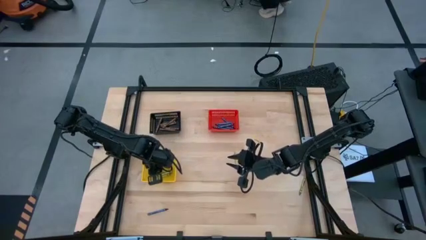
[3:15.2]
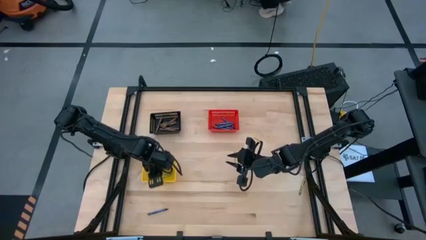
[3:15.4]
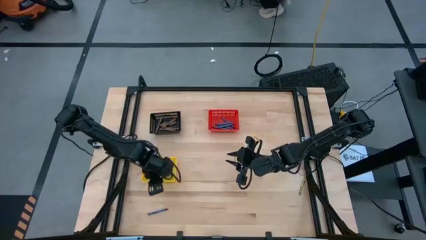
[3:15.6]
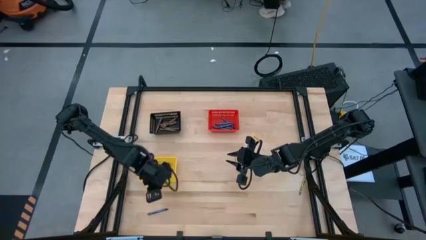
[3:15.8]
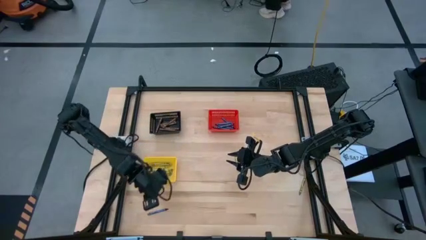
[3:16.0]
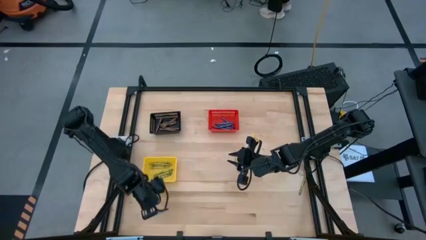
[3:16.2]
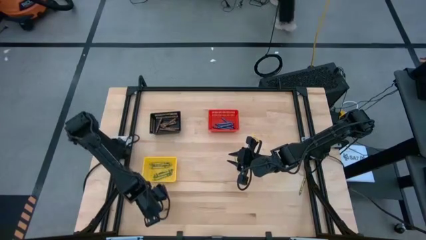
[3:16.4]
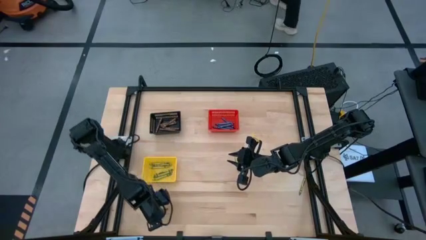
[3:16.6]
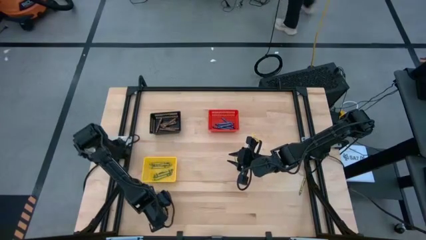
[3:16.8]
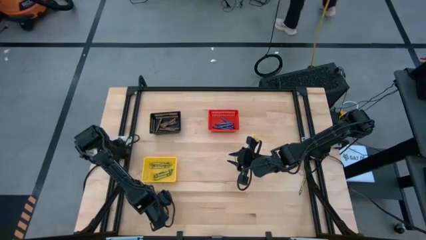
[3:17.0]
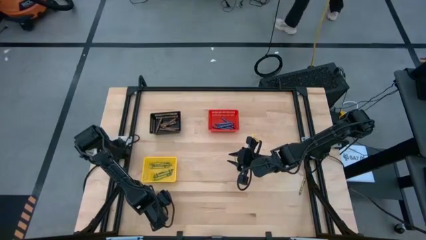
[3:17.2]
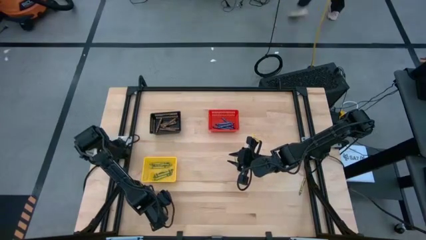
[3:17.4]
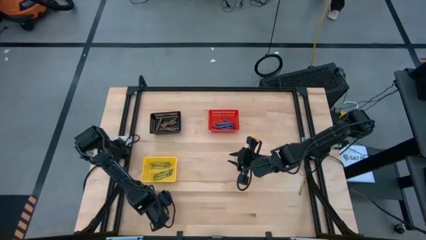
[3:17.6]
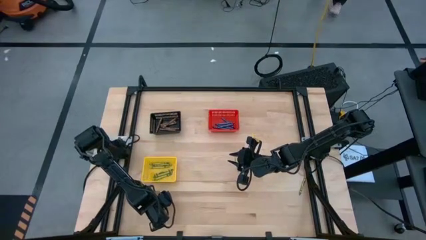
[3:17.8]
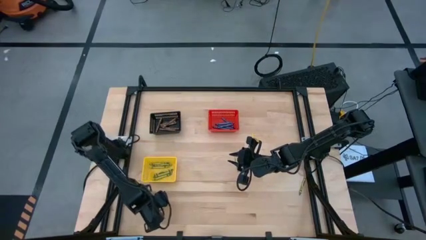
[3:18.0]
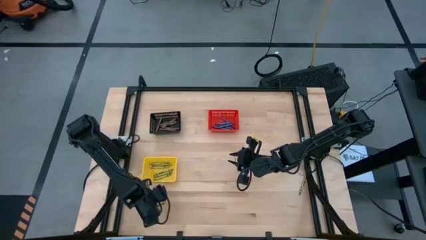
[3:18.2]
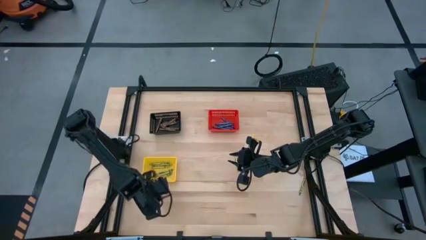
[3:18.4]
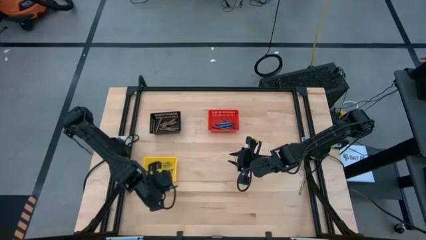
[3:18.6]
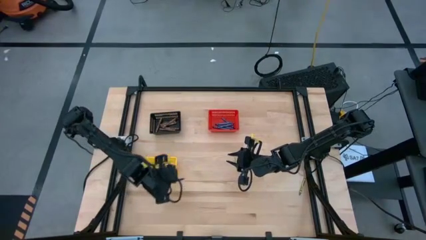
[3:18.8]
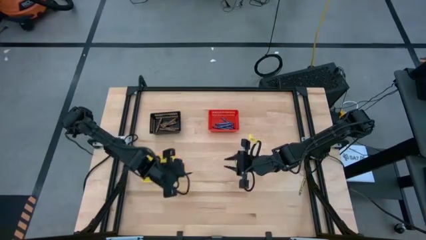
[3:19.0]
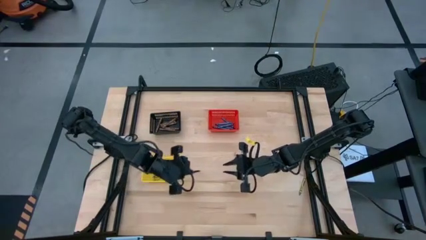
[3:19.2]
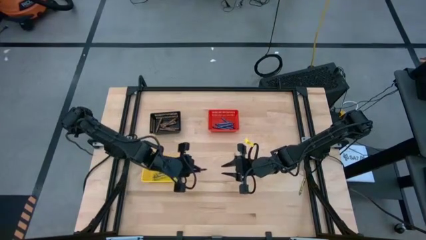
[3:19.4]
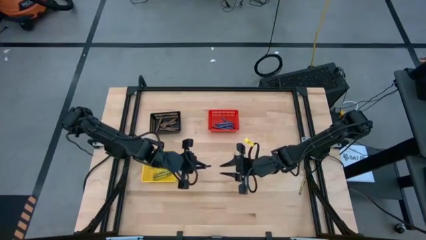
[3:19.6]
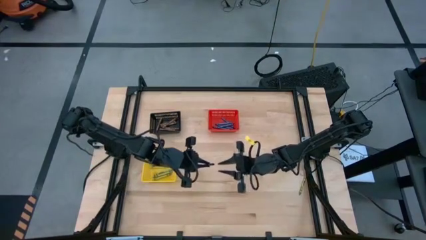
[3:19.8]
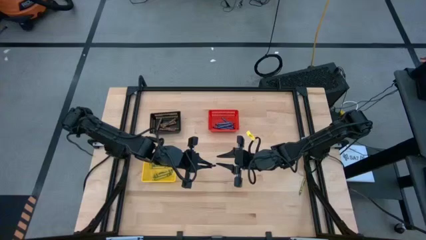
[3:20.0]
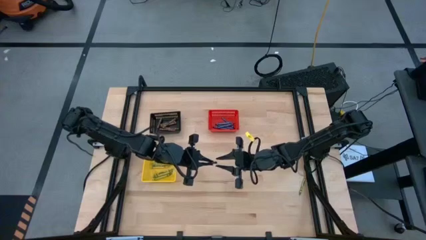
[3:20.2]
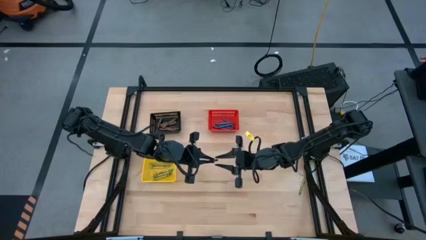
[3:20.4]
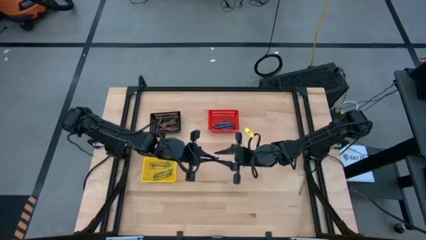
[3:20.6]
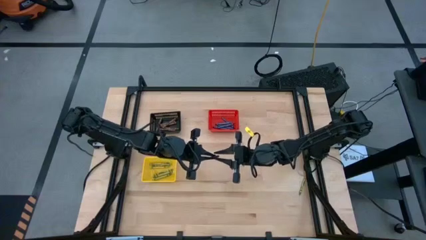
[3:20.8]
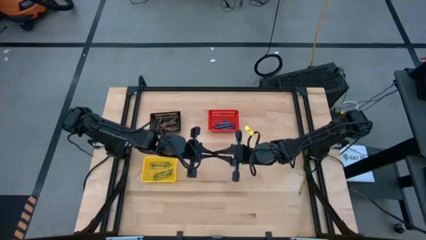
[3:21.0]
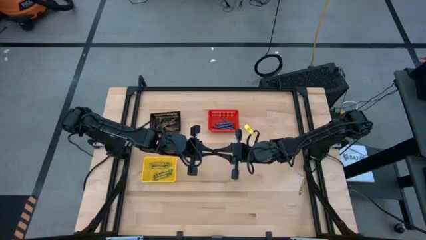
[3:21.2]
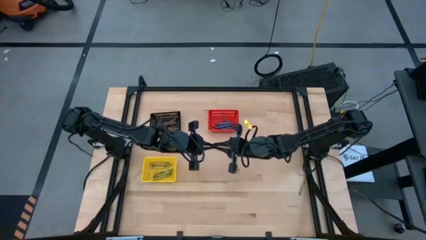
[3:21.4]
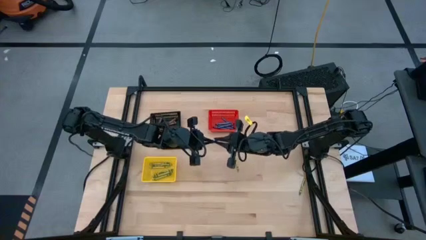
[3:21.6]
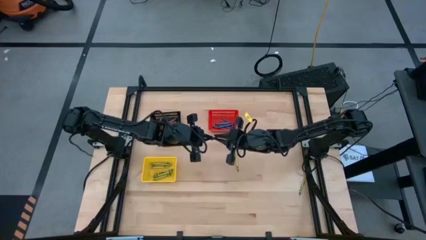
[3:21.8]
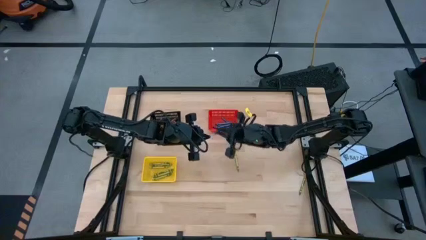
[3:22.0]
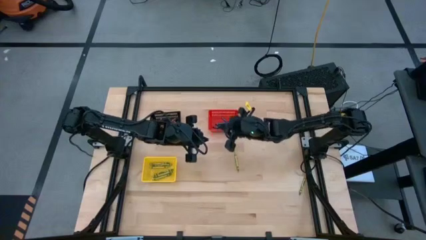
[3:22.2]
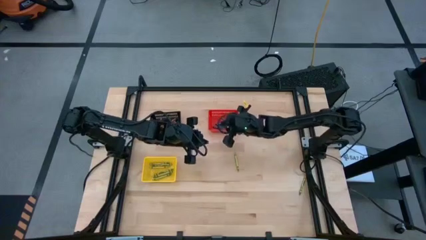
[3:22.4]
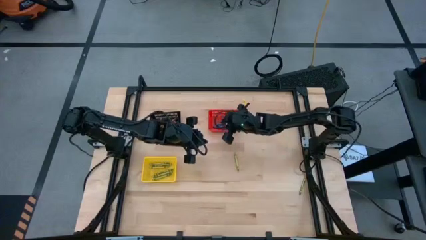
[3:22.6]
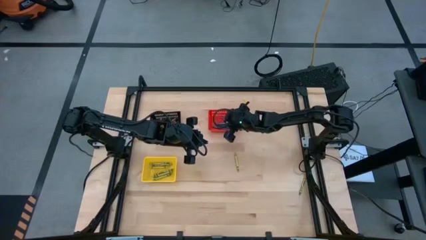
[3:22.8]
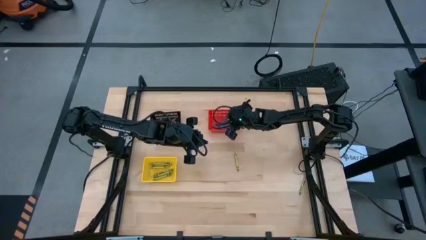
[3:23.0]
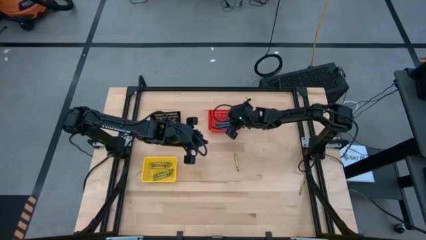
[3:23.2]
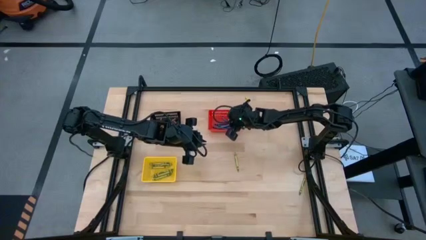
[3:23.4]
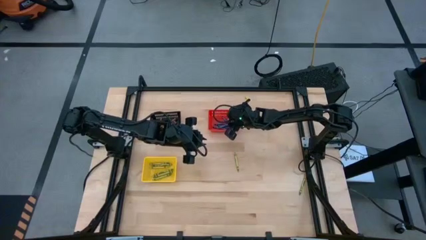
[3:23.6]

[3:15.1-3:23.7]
Task: Sort crayons
Put the blue crayon into the red bin
